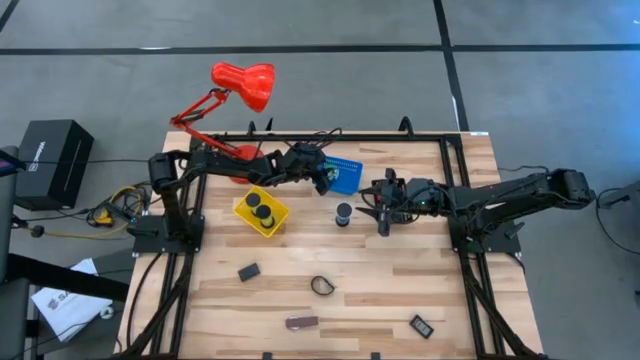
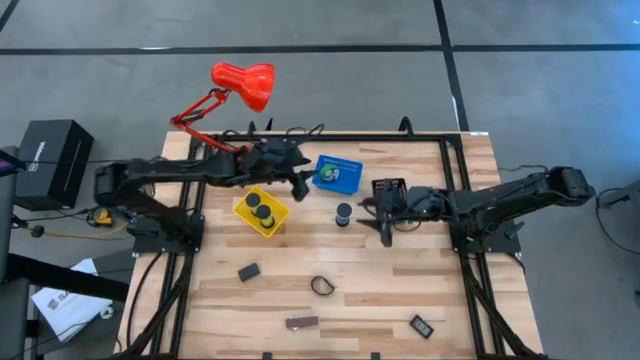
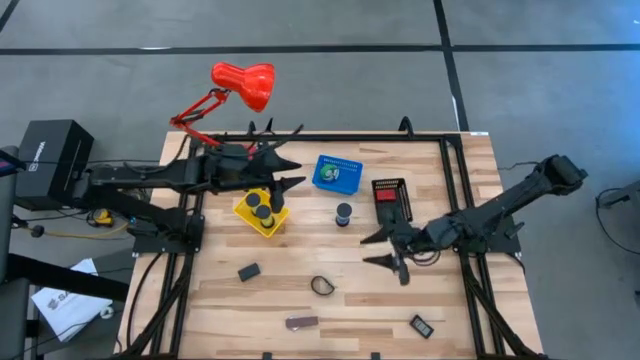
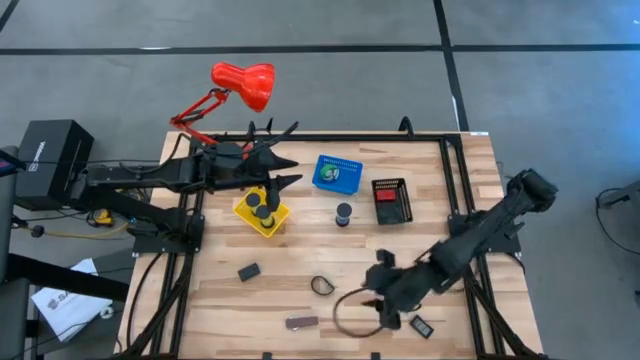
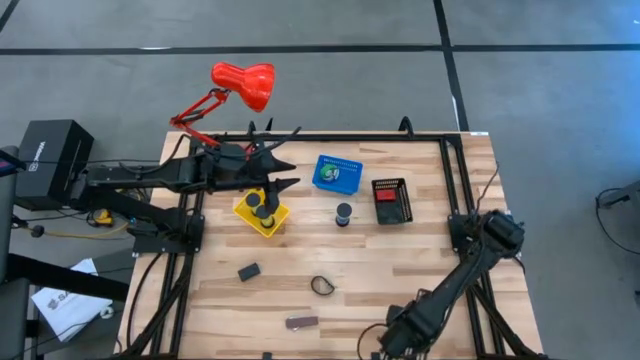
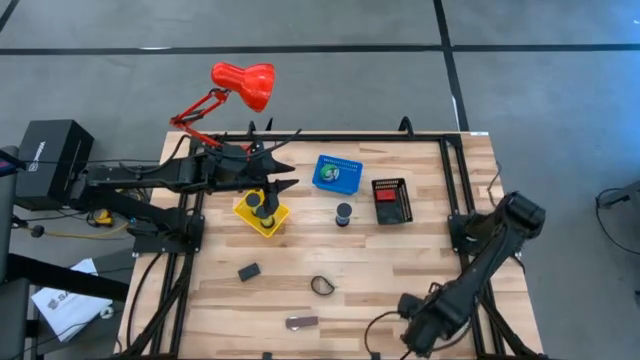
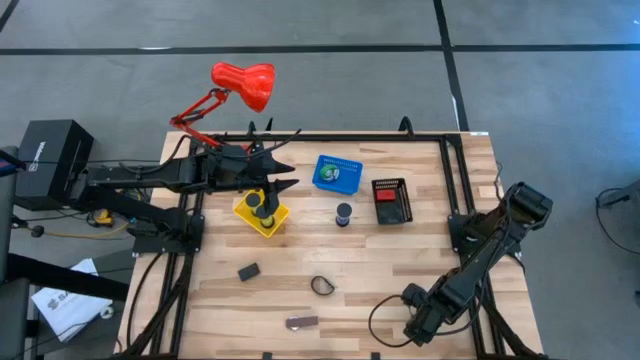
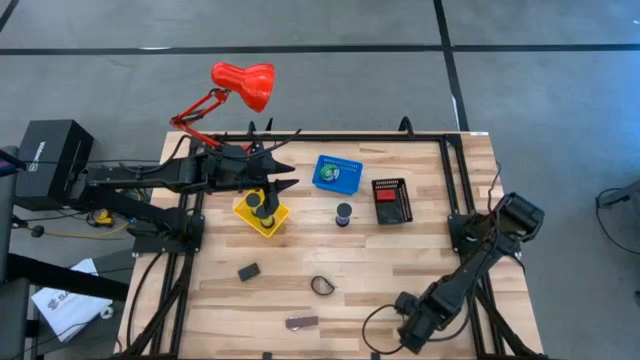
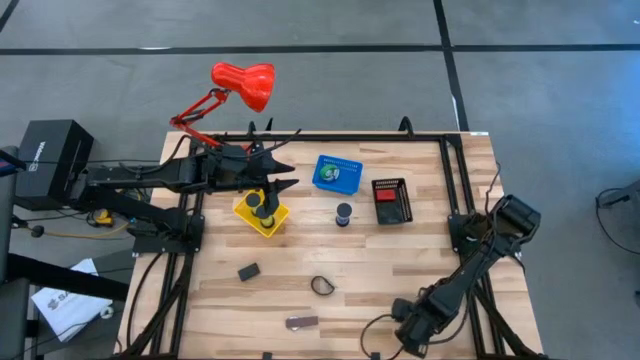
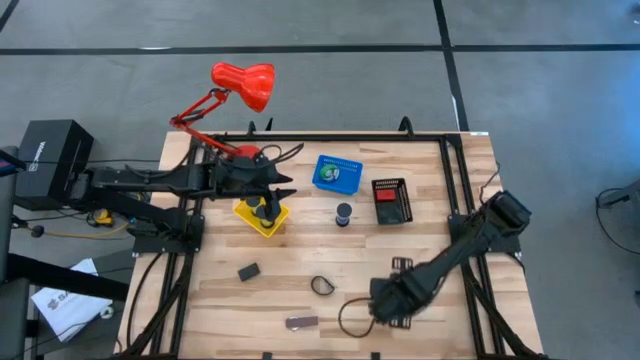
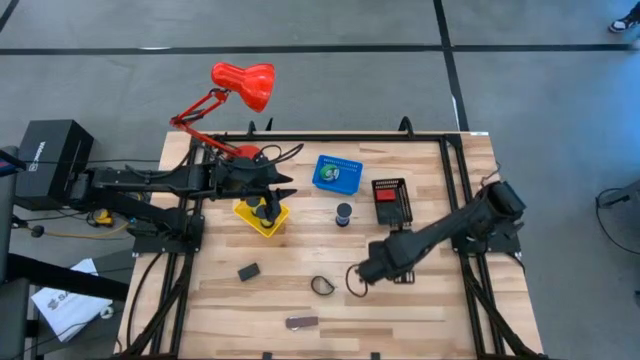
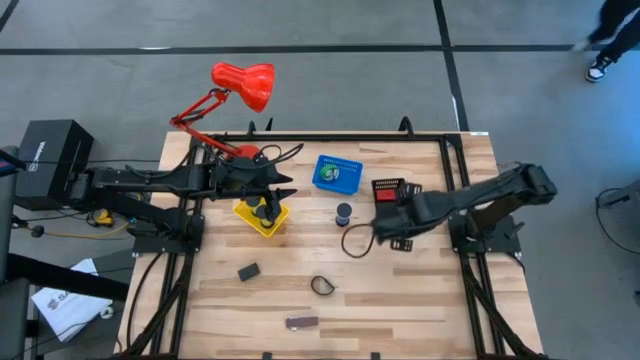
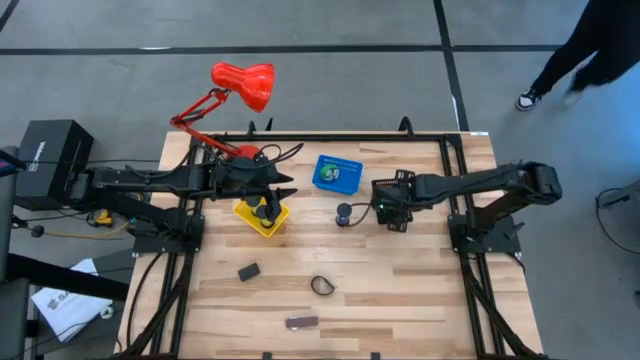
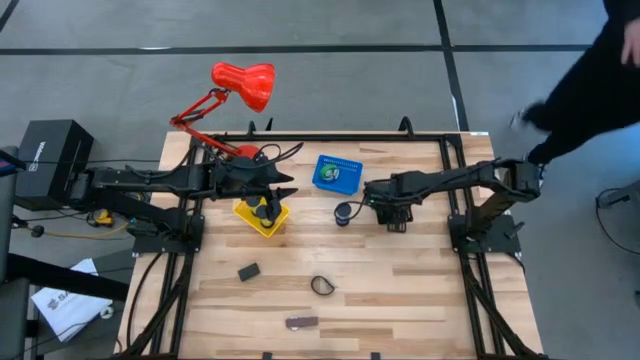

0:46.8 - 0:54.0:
Task: Pick & Place Office items
Put the bottom black digital clock into the black bin

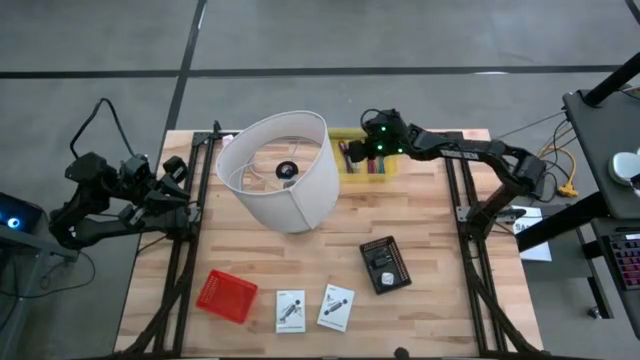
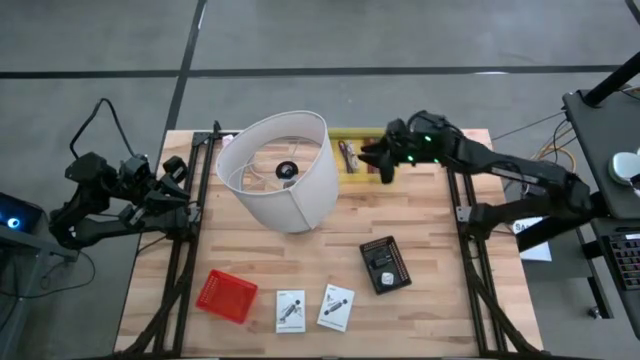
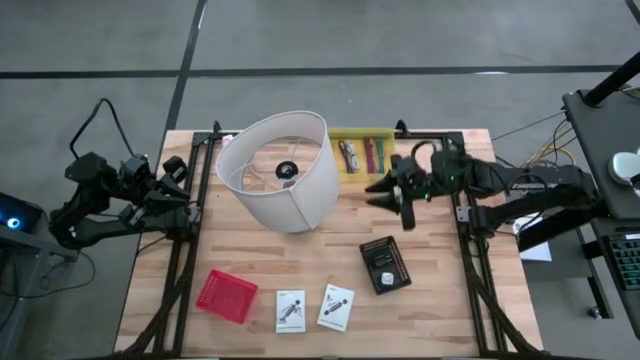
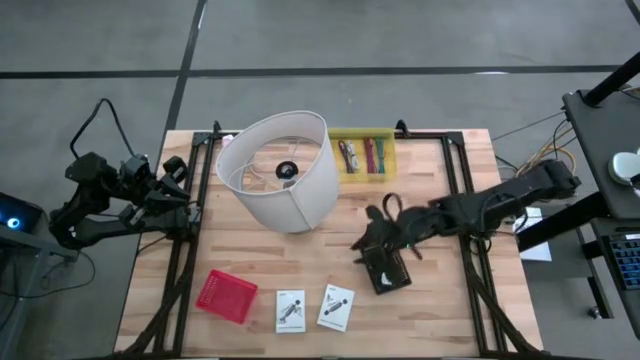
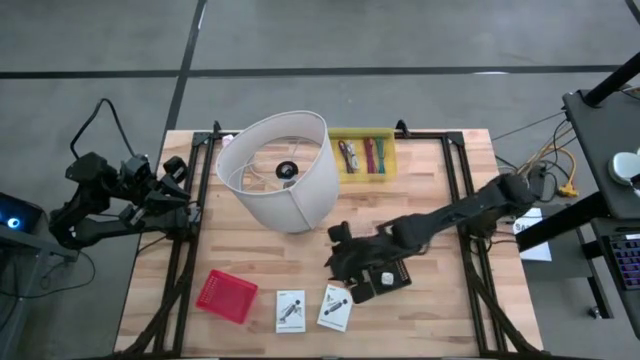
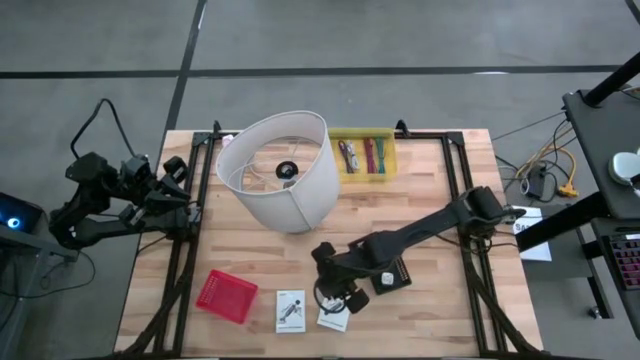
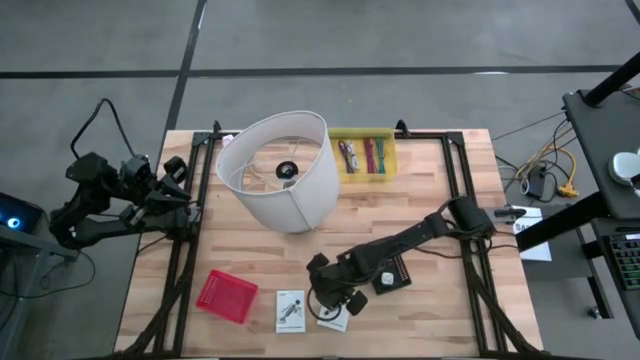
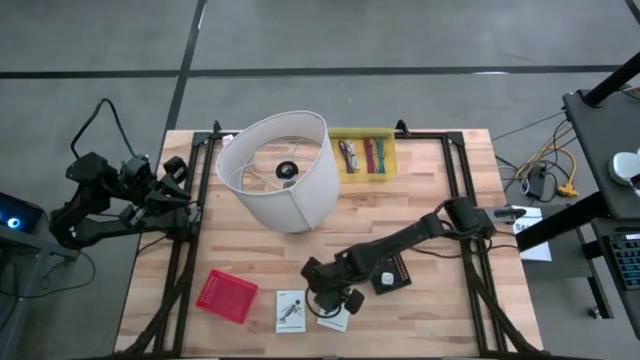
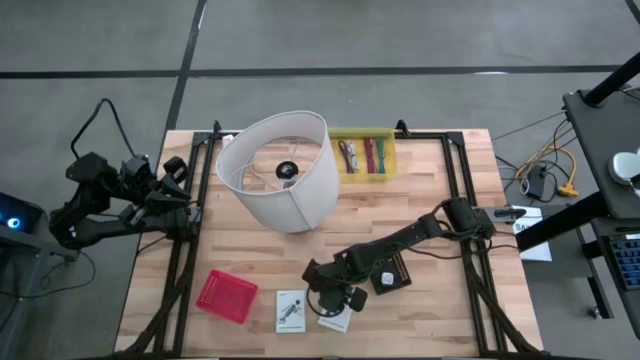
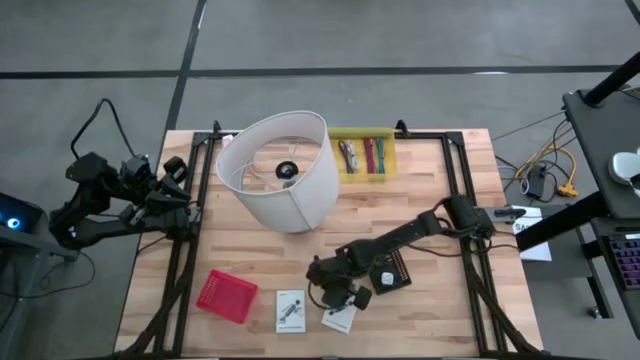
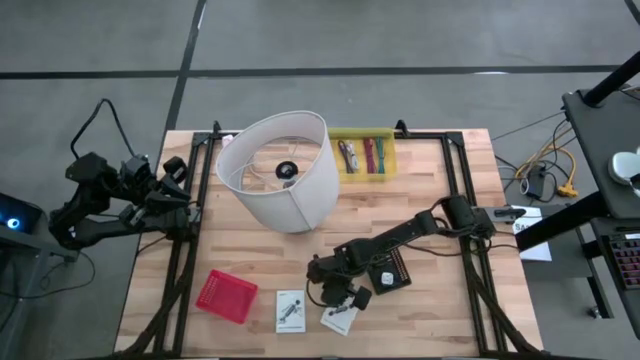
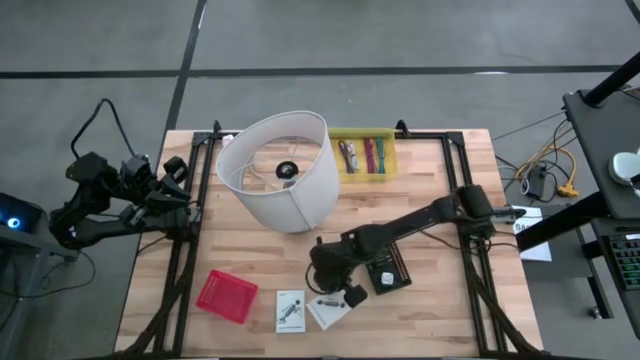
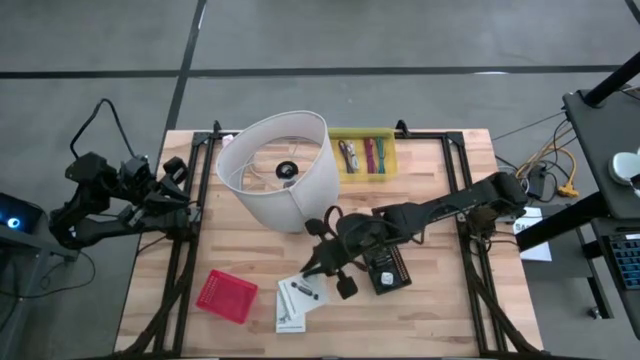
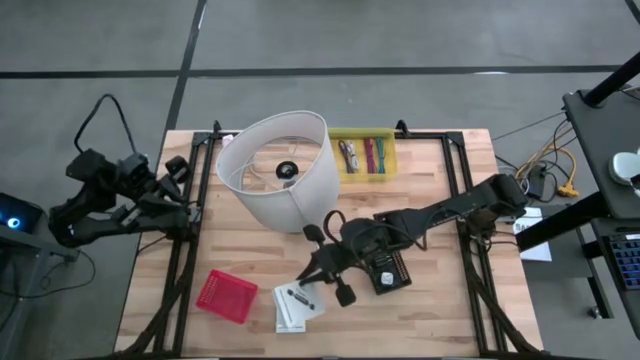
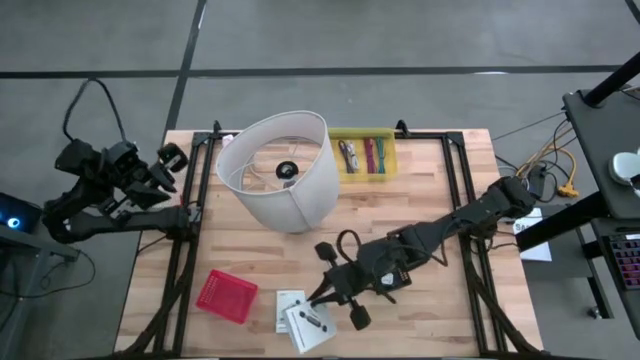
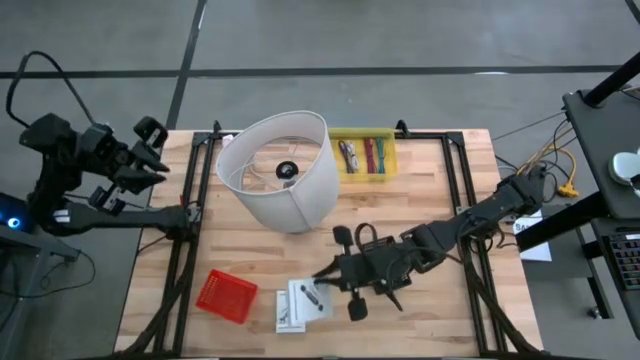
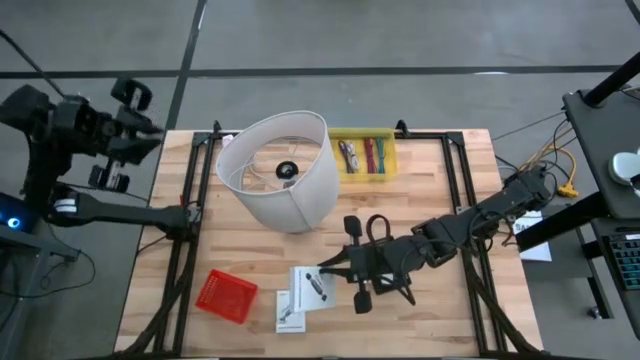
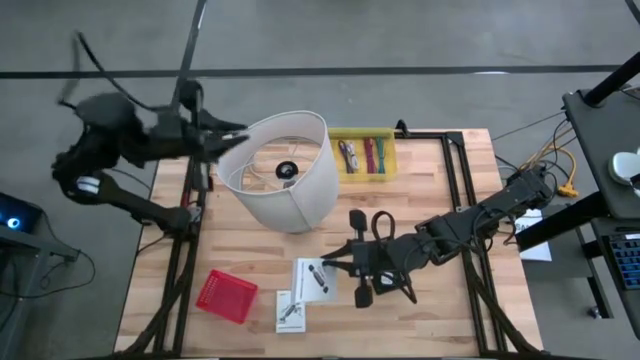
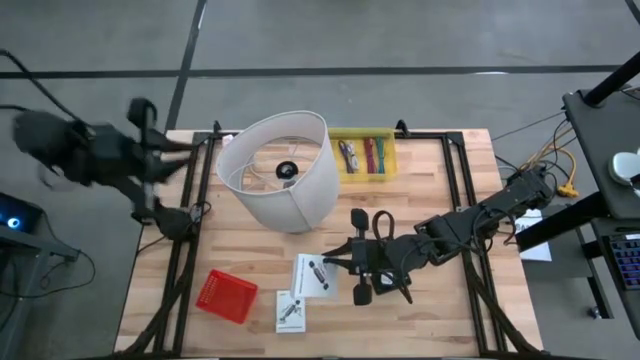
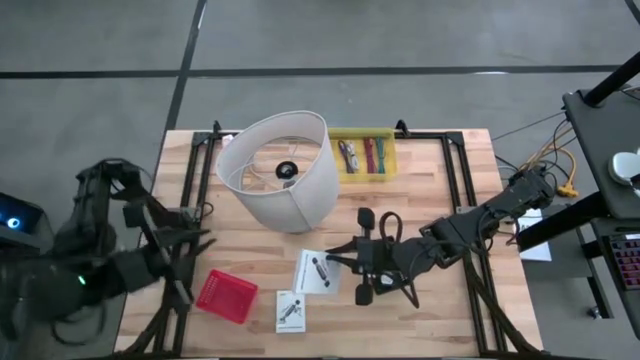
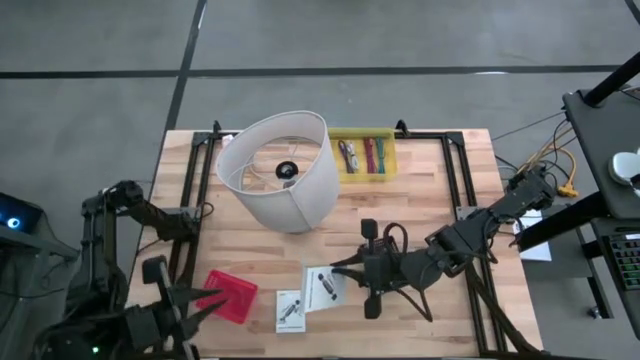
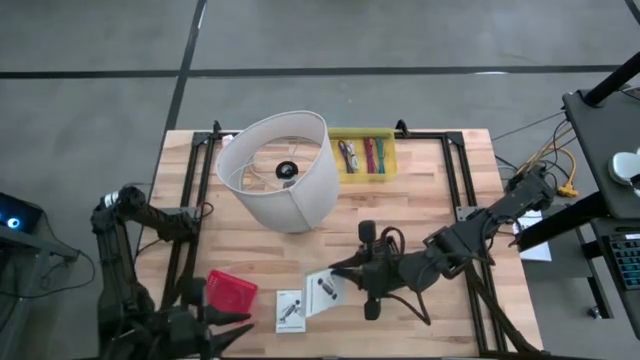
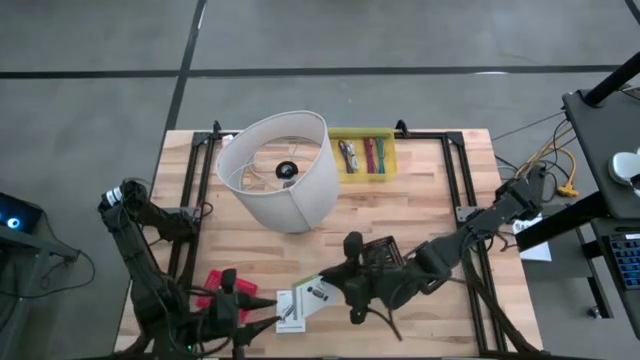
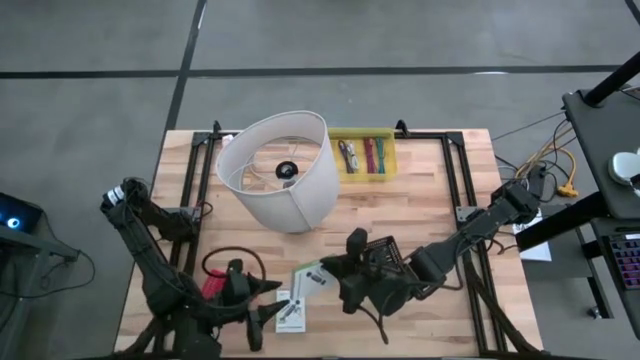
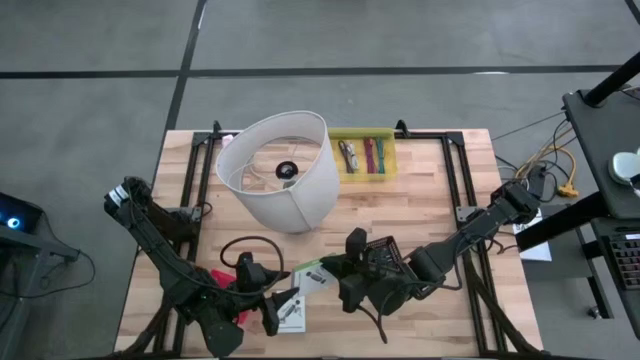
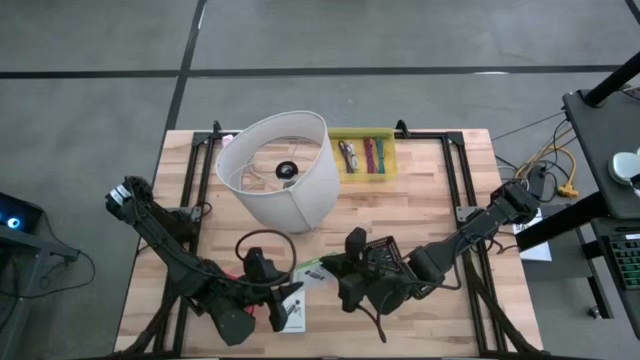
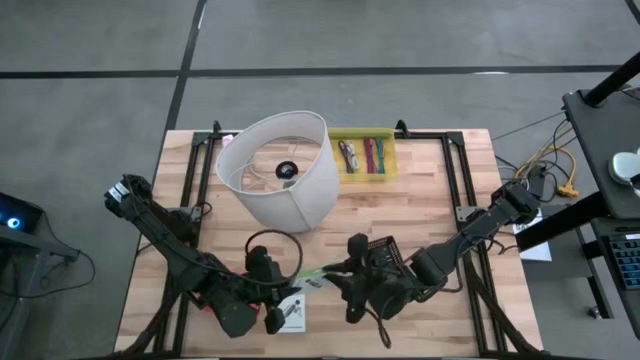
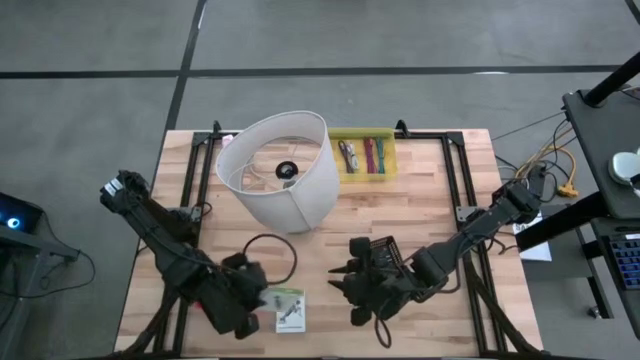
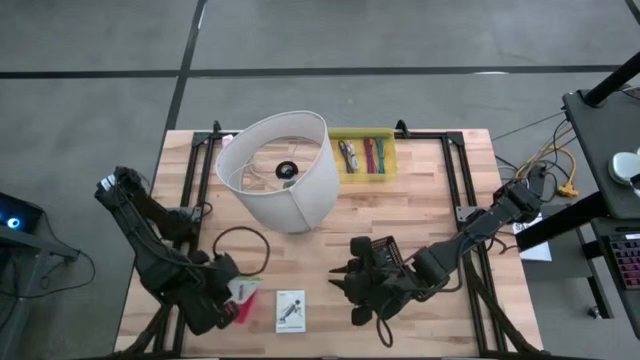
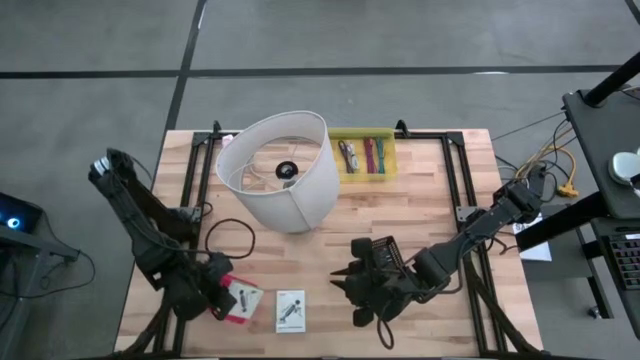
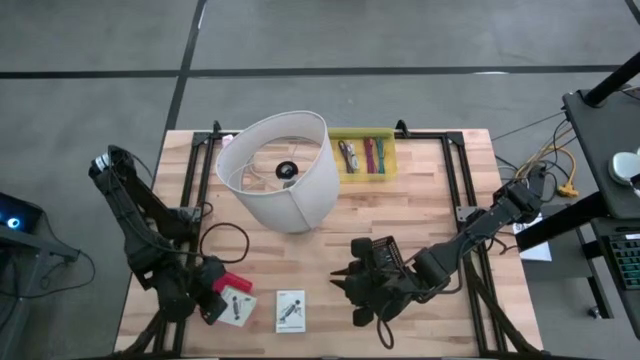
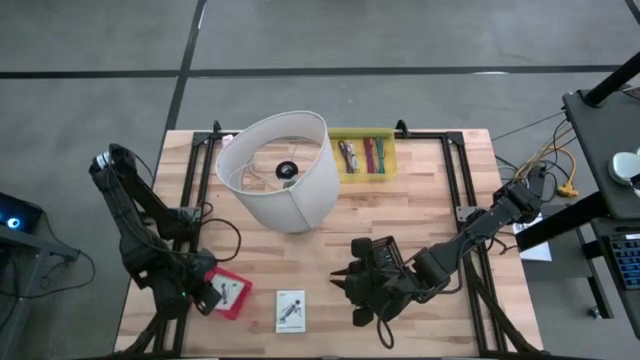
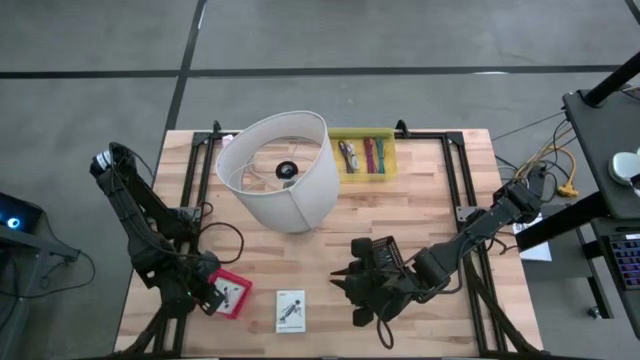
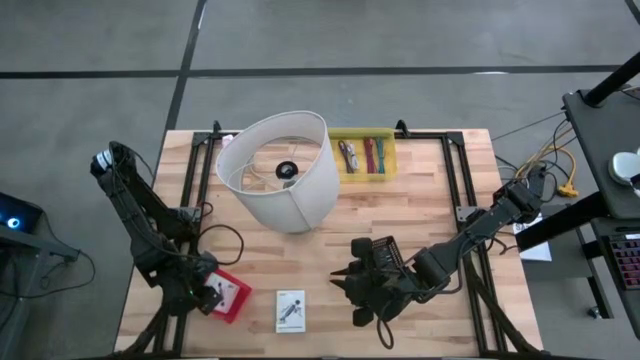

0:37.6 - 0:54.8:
Task: Pick and place items into bin
Put the right white box into the red bin
